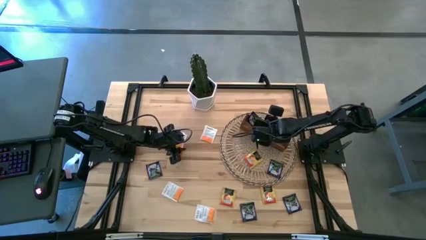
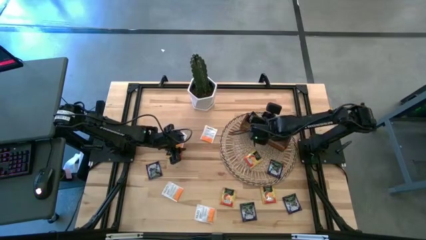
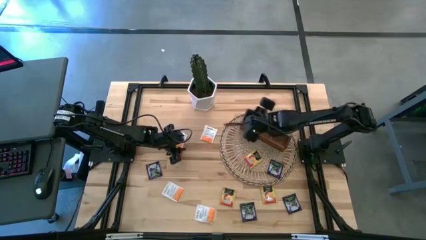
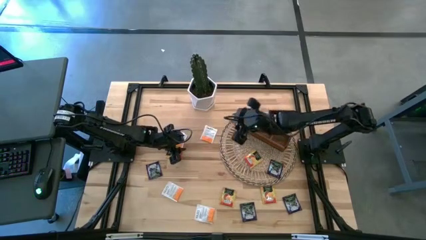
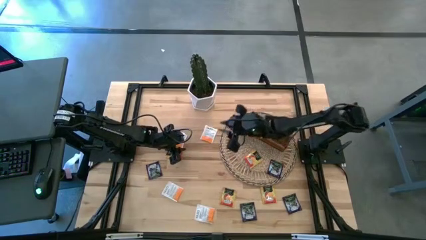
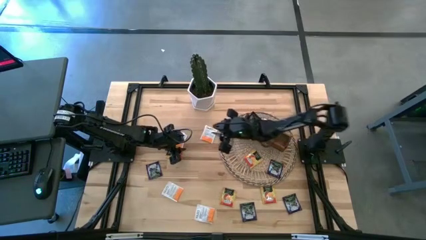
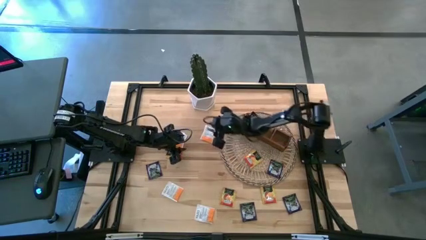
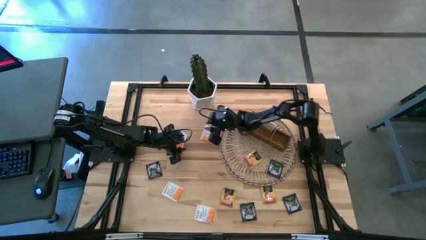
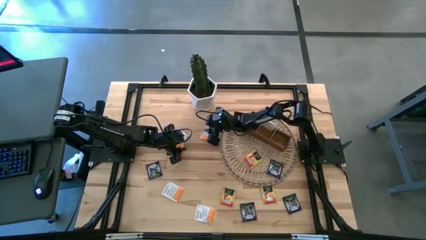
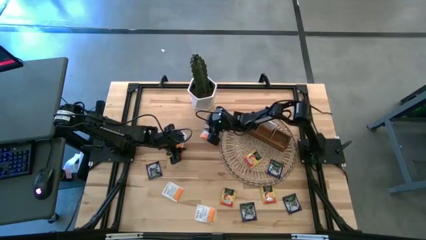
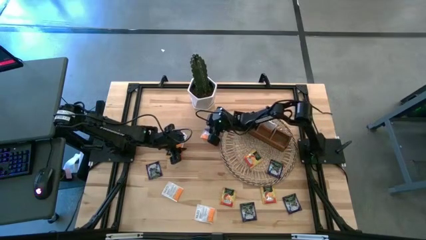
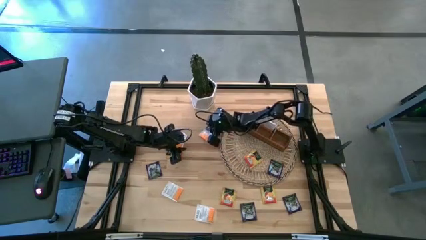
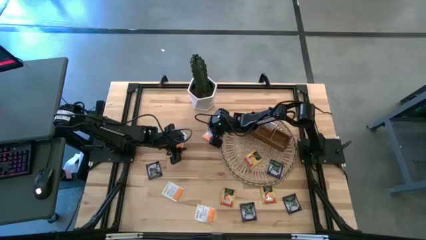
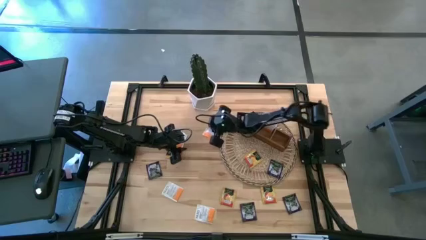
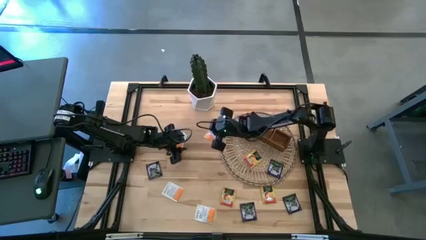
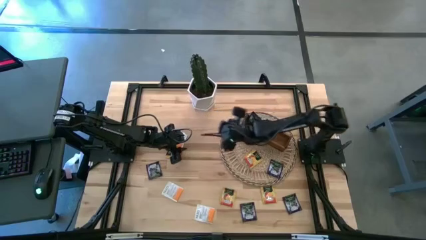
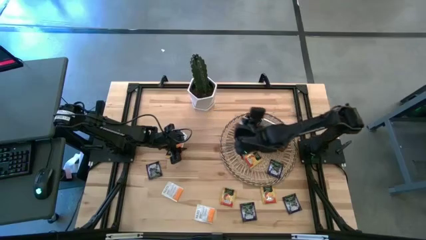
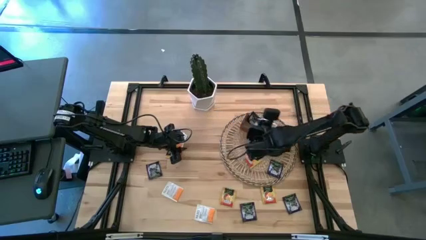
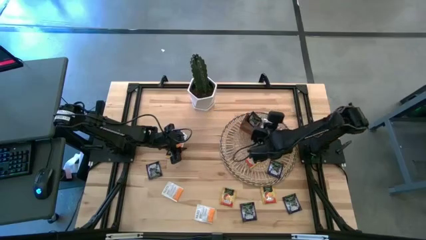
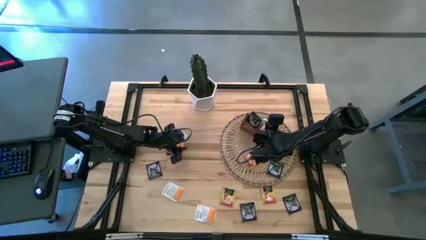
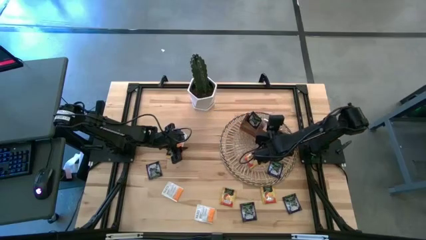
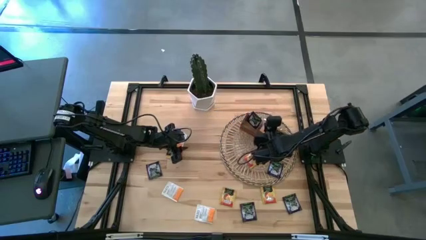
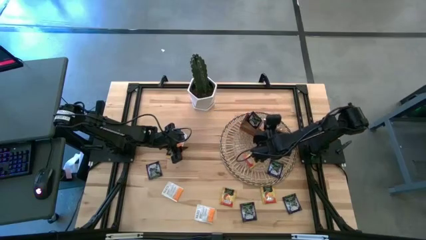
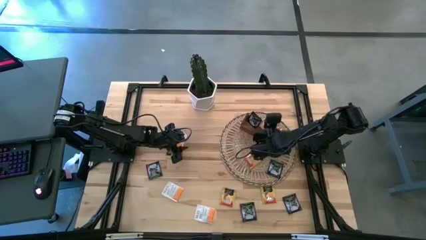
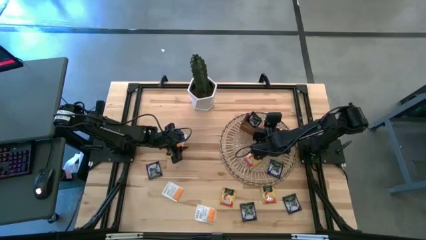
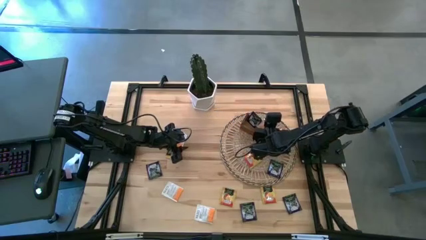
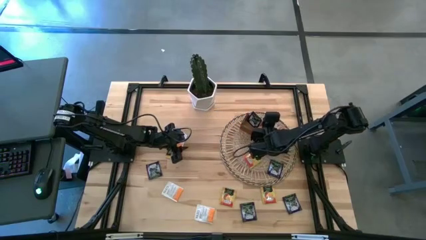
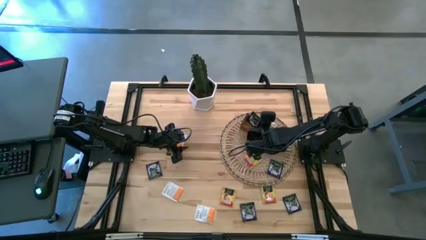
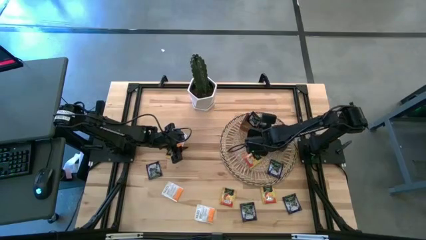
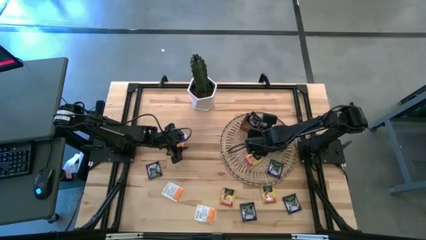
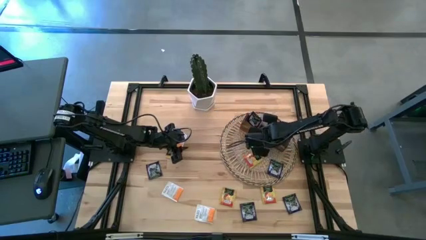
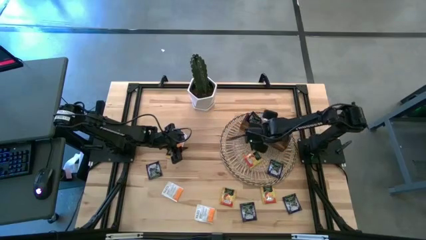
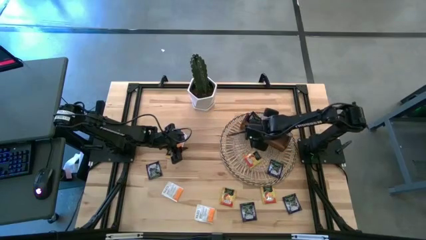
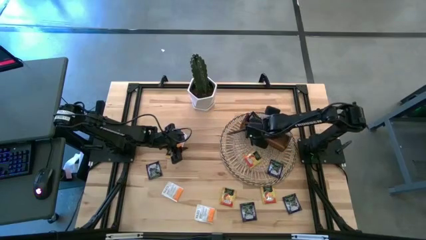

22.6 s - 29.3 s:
Task: Pick & Place Tea
Put the white tea bag into the middle section of the wooden organizer

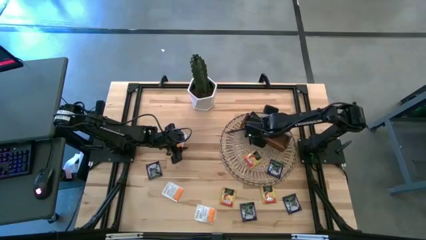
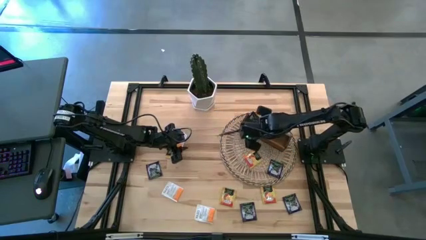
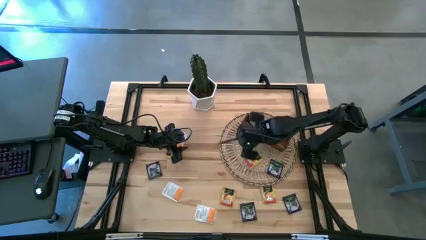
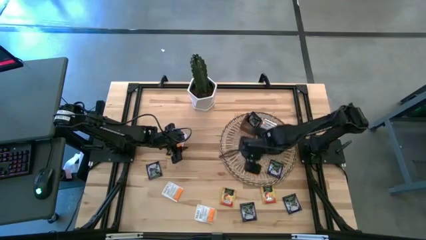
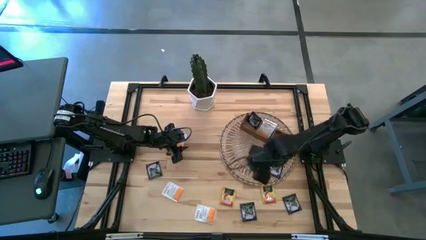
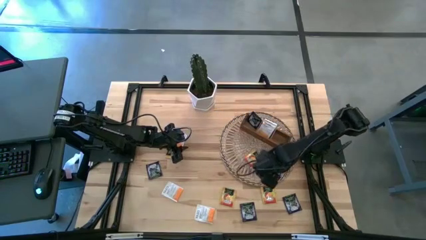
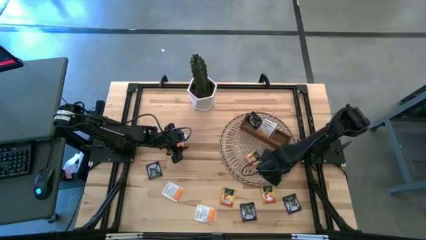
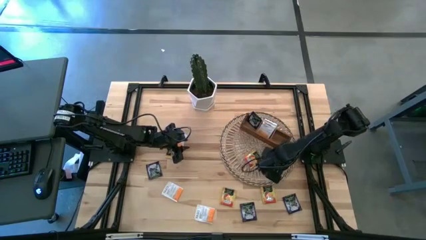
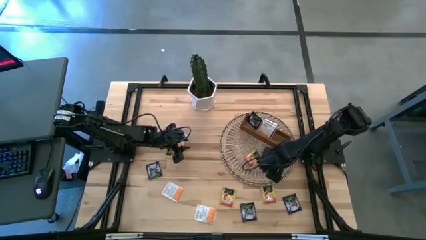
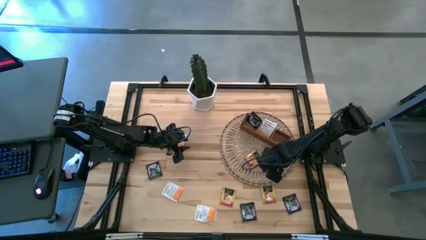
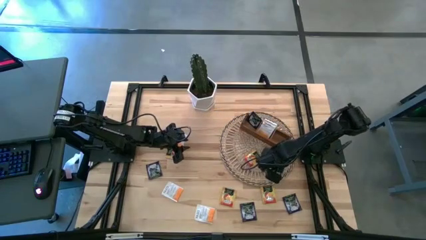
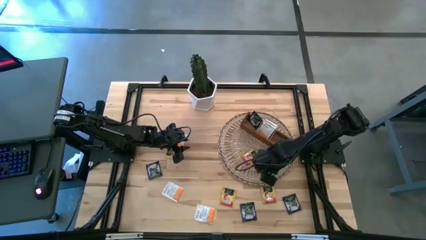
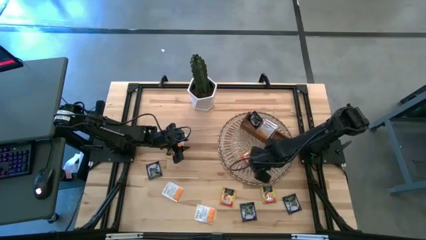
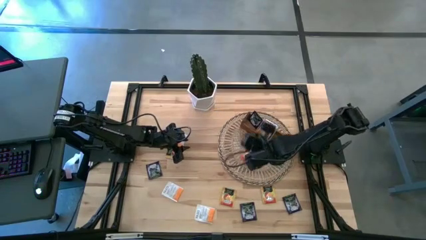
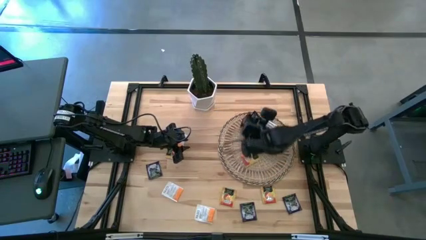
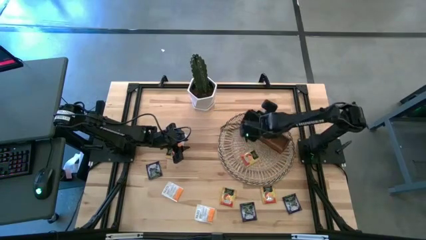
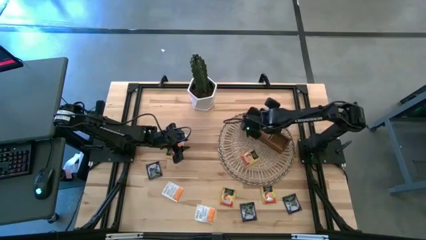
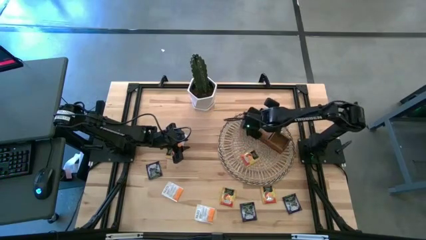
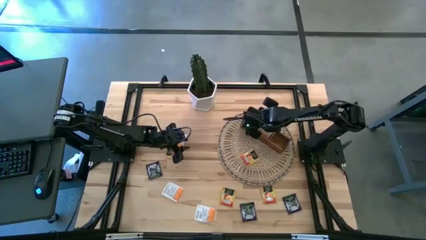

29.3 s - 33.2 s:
Put the purple tea bag into the left section of the wooden organizer

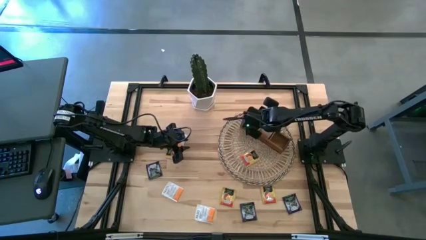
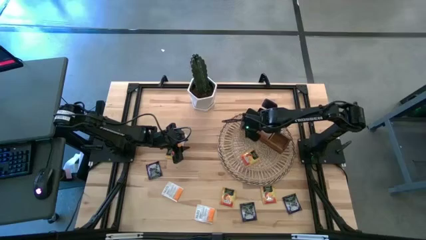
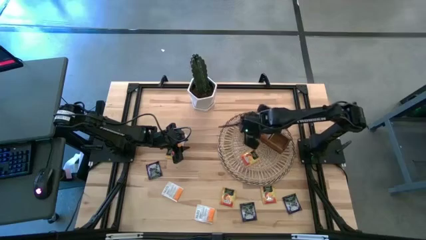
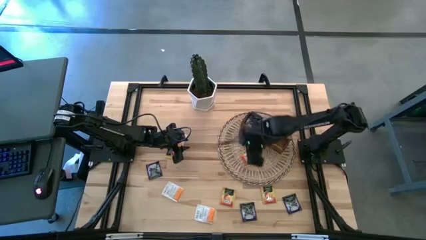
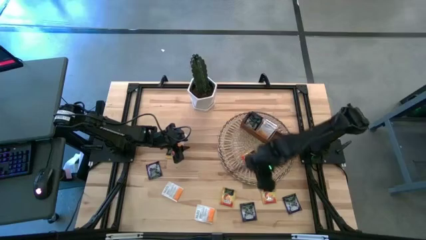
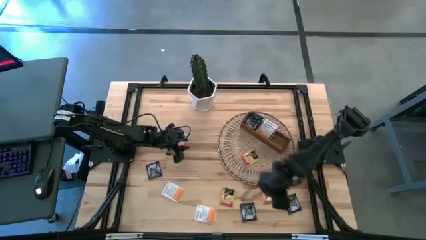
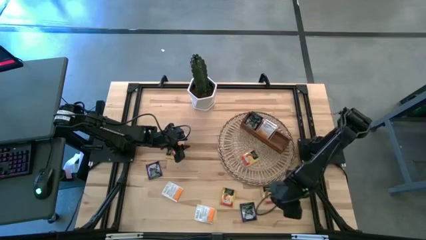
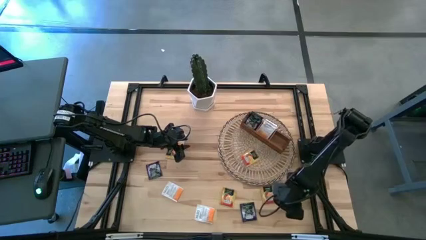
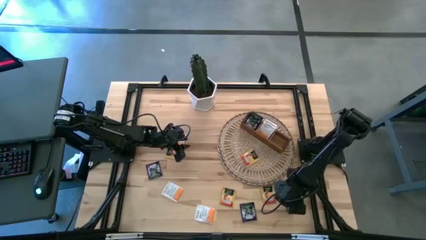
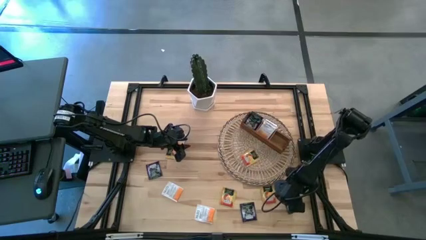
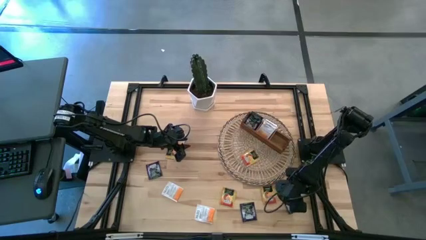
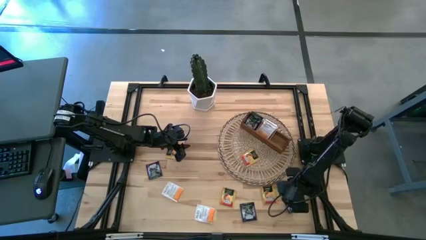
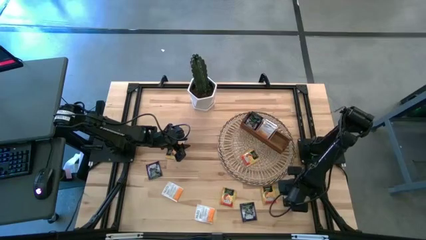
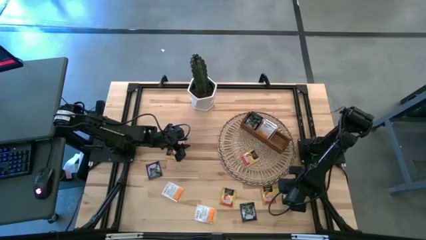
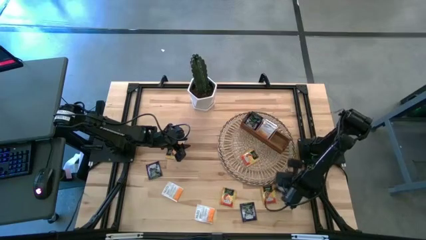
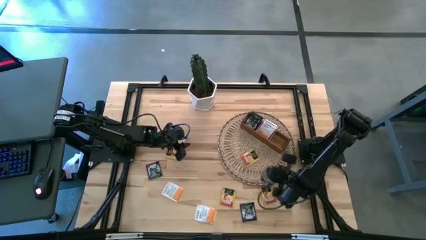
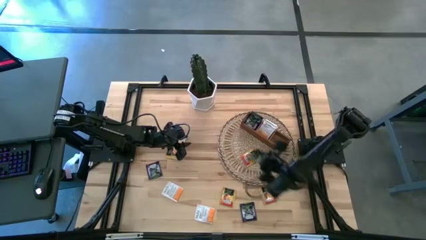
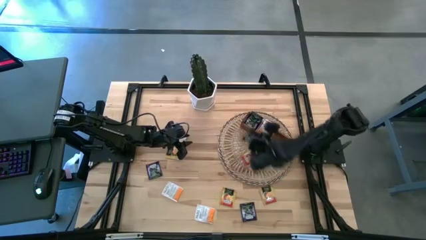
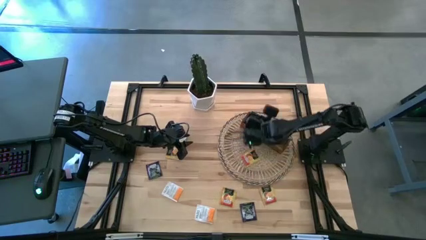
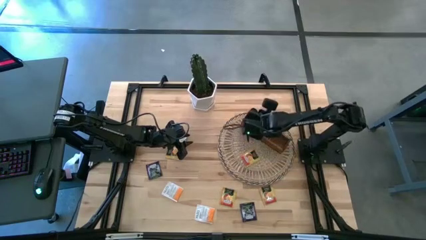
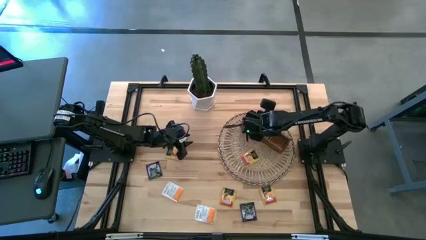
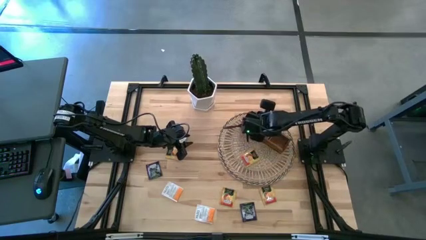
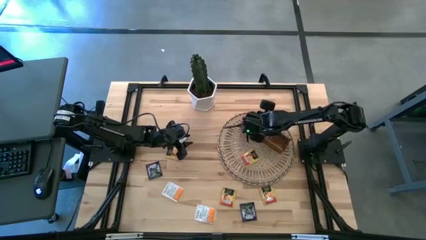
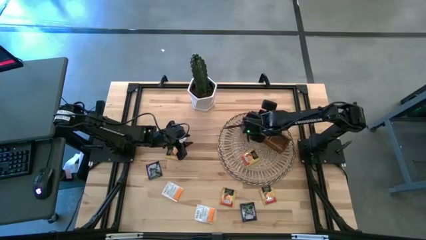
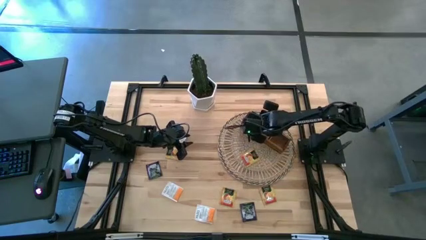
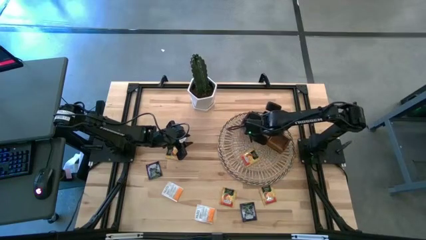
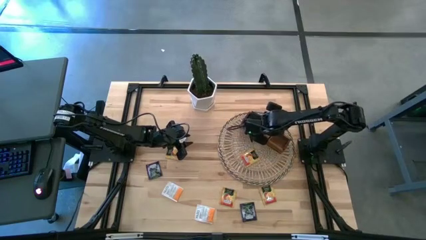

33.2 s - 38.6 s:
Put the purple tea bag into the left section of the wooden organizer
